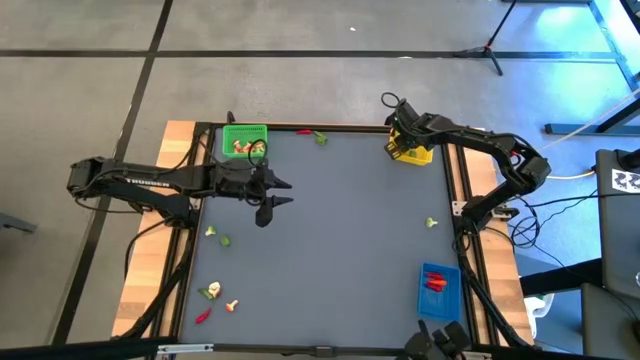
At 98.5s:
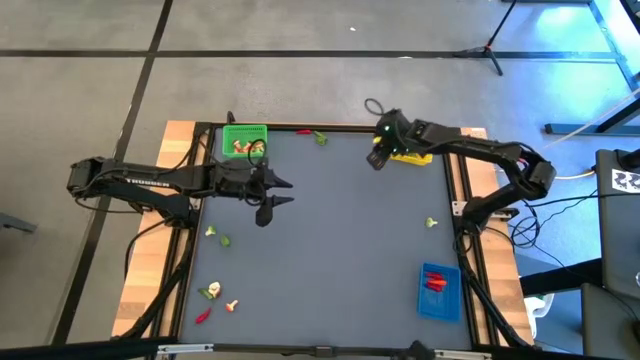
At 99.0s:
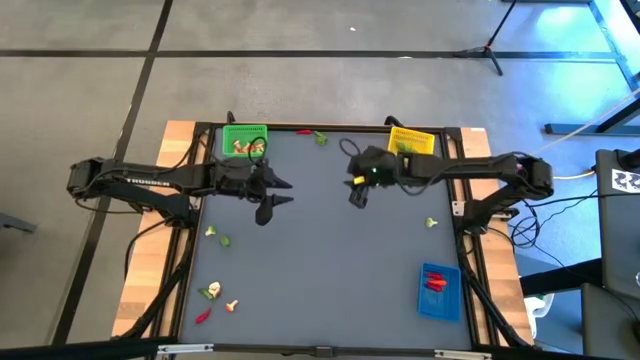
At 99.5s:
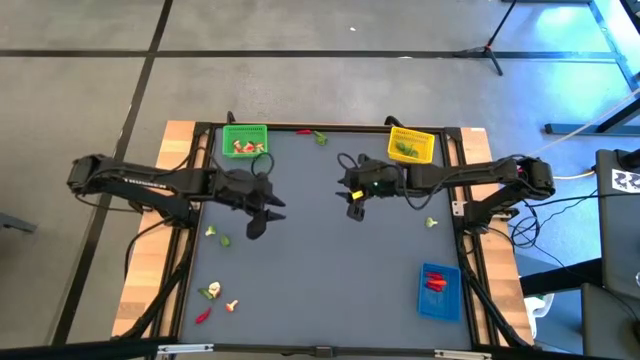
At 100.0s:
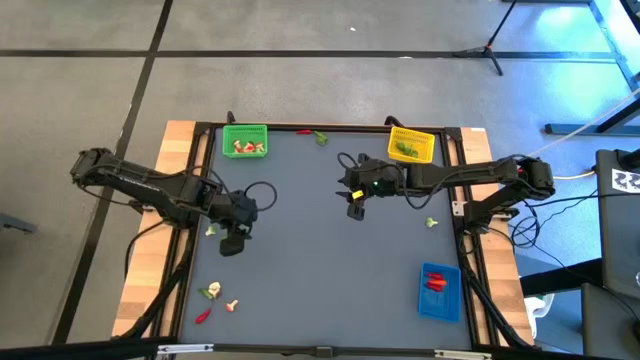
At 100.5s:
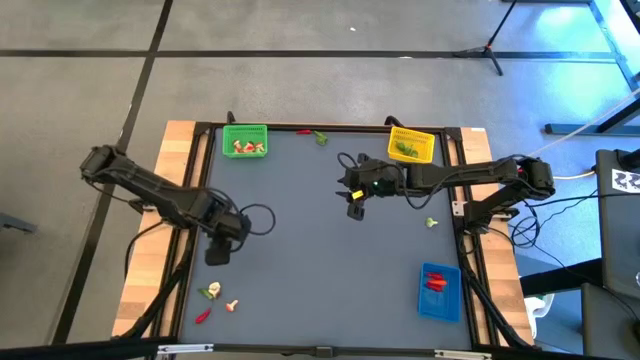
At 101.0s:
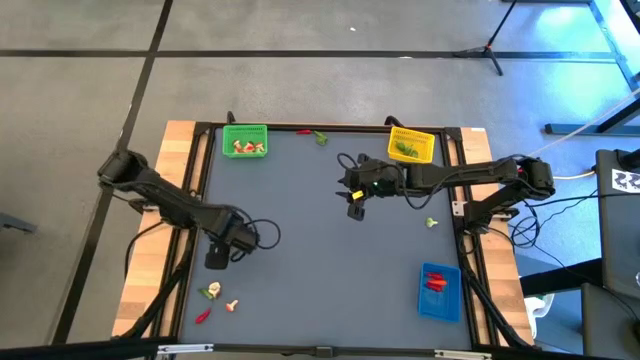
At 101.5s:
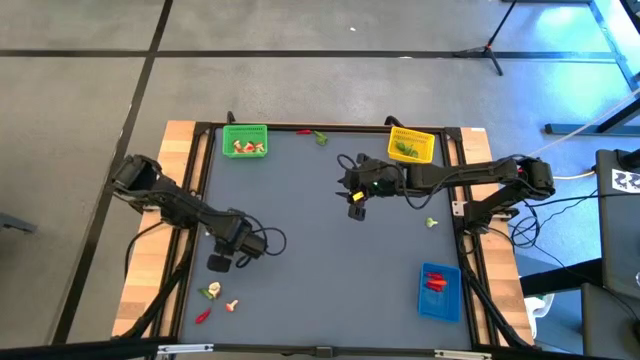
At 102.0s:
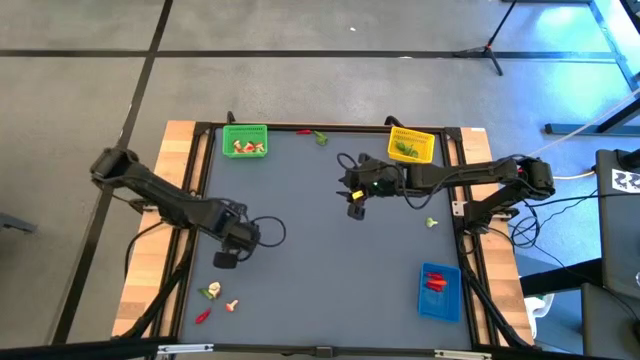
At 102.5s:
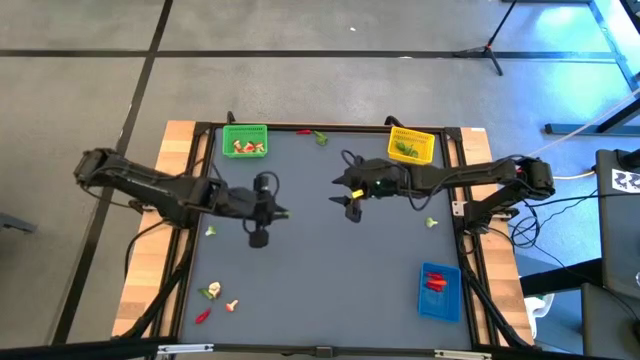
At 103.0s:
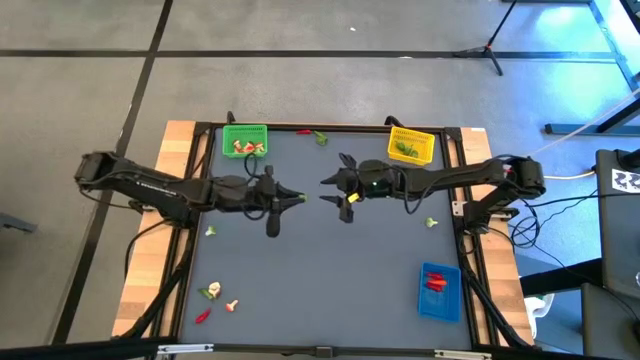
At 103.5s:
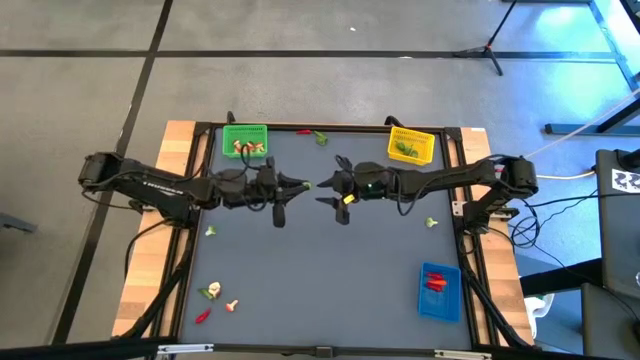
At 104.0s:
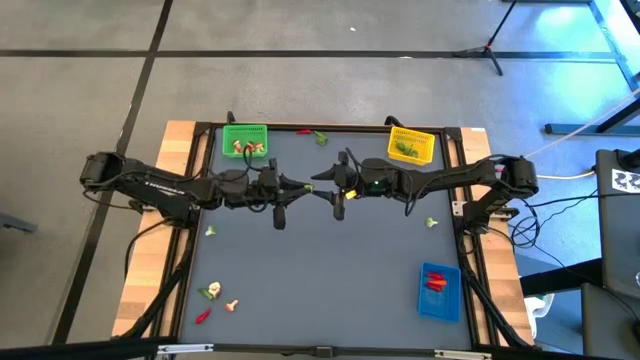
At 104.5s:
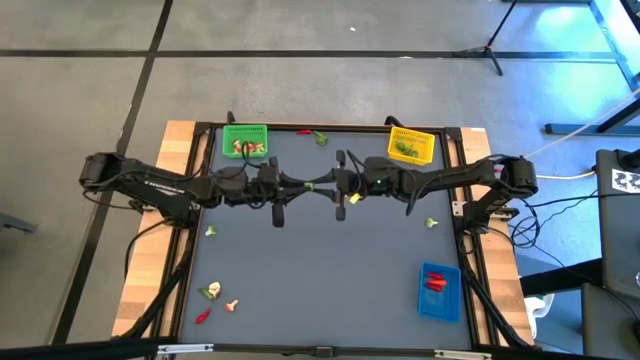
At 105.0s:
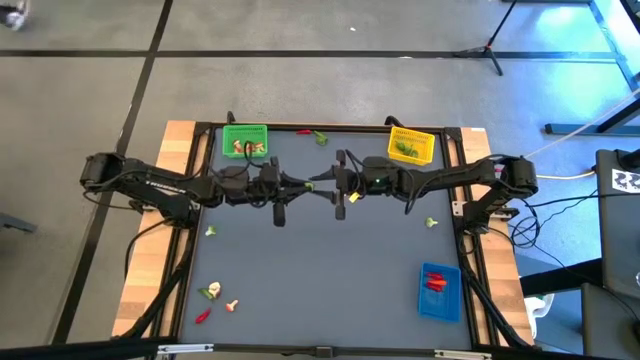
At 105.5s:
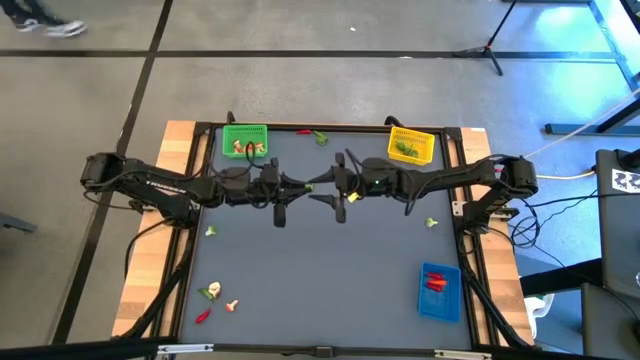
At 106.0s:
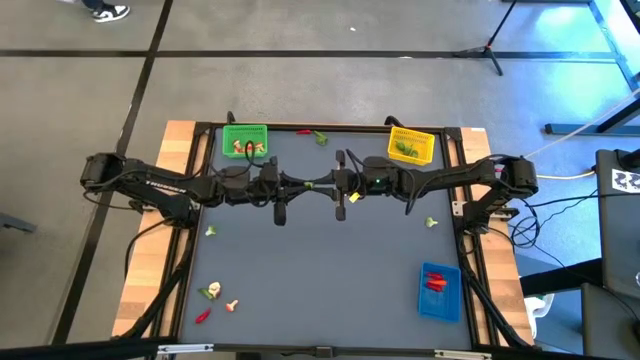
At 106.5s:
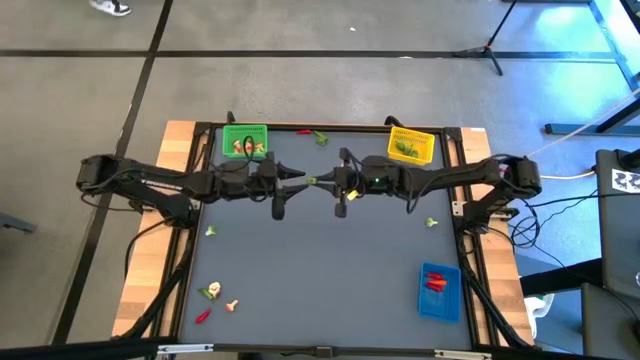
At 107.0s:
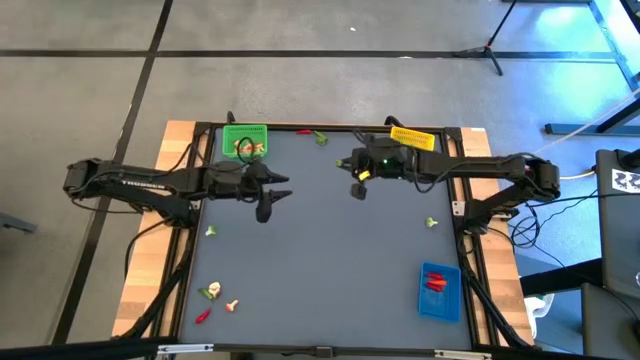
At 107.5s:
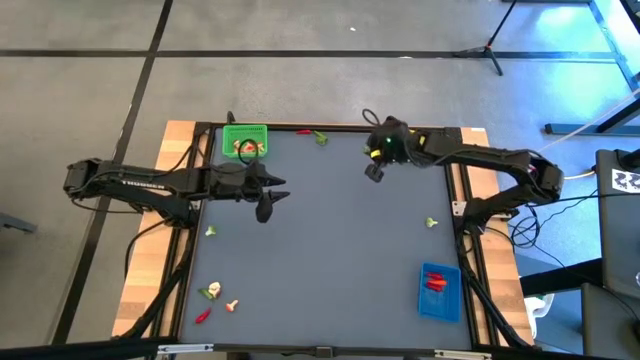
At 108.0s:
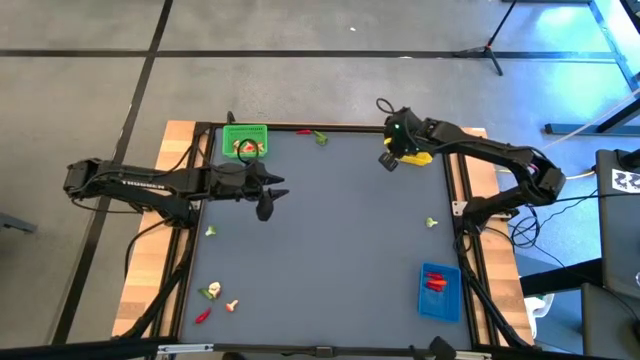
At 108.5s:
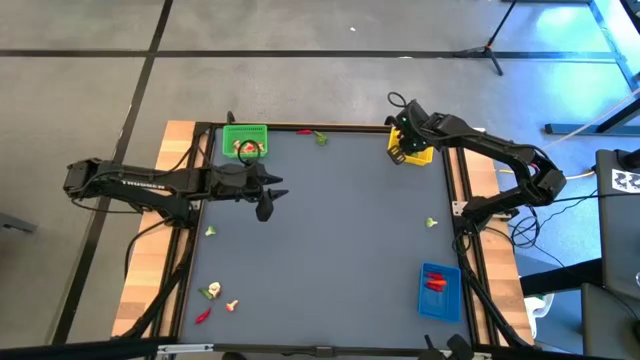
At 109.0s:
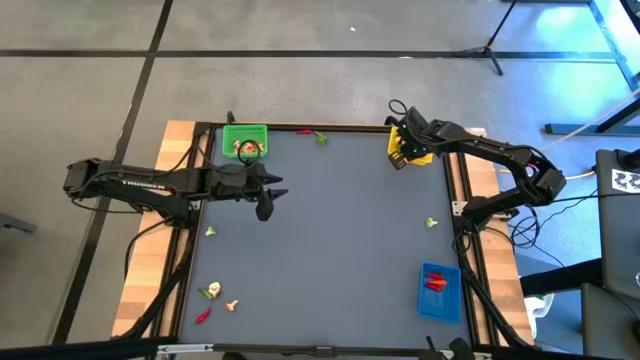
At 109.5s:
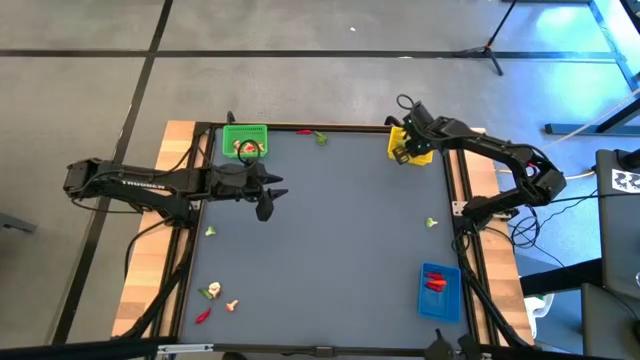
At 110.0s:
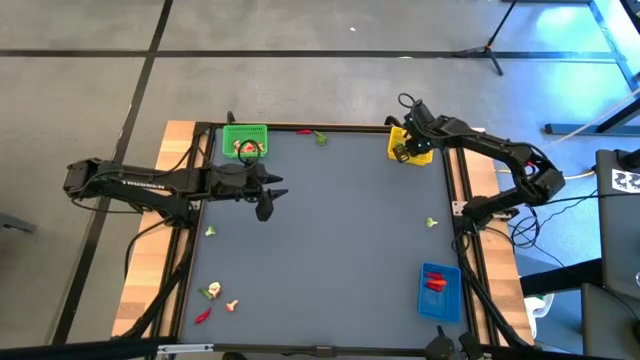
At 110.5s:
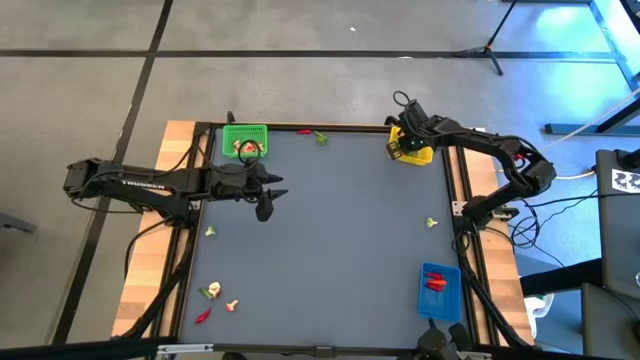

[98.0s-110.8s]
Task: Sort produce into baskets
Put the green chili pepper into the yellow bin

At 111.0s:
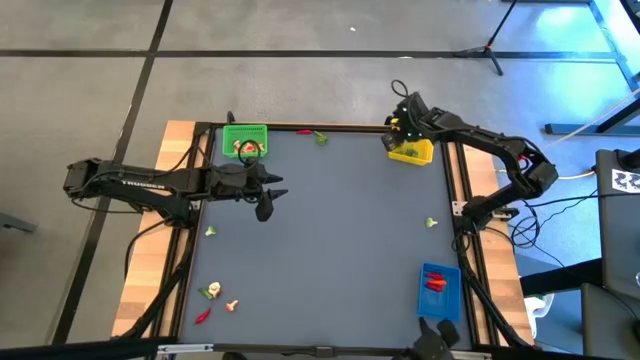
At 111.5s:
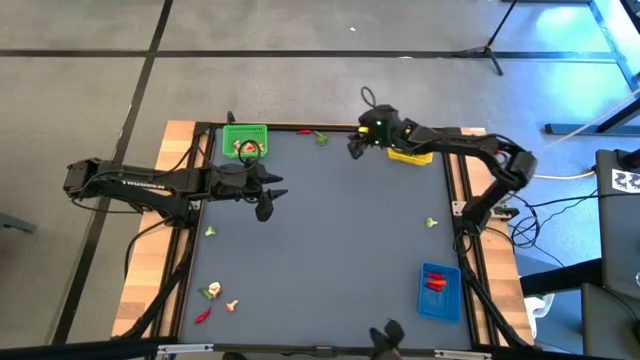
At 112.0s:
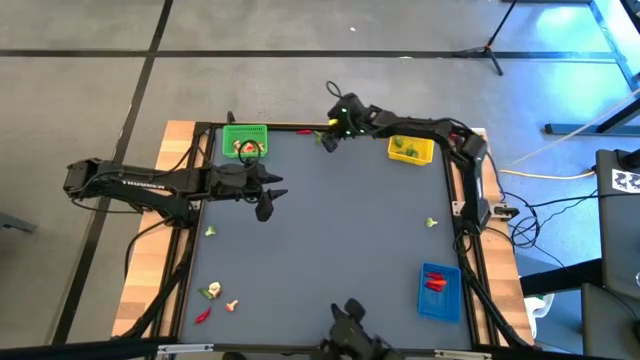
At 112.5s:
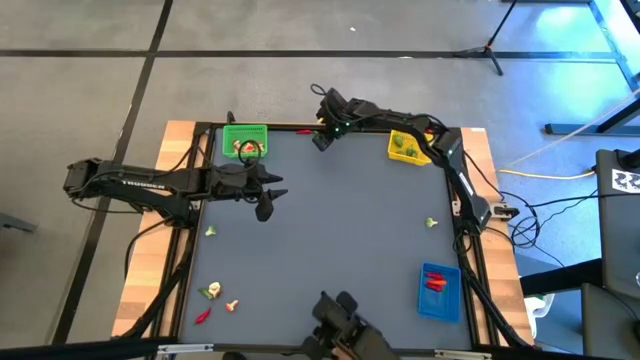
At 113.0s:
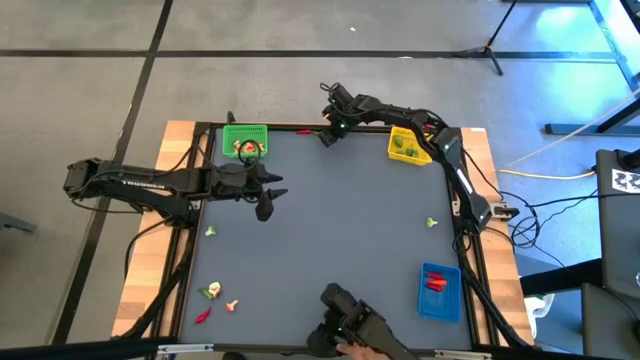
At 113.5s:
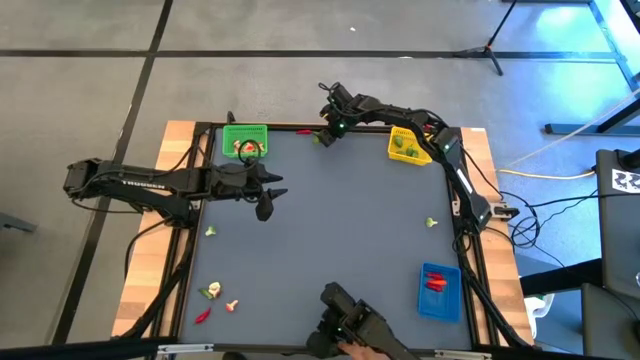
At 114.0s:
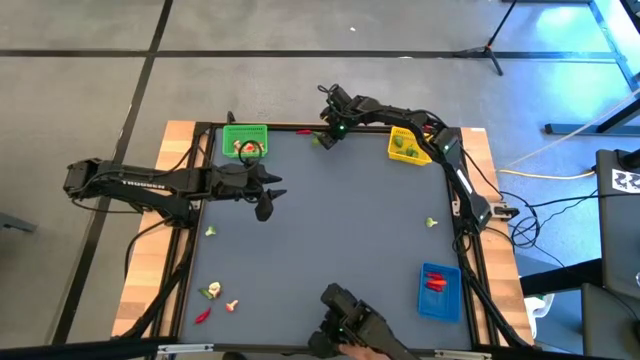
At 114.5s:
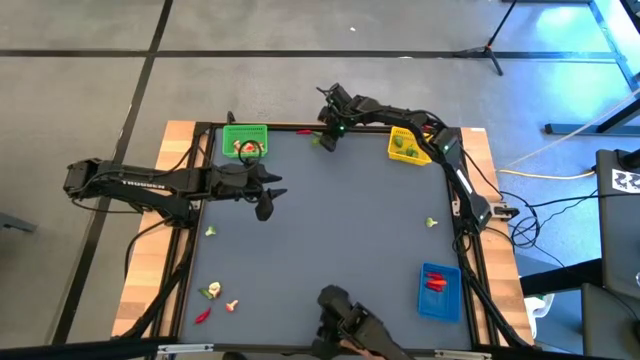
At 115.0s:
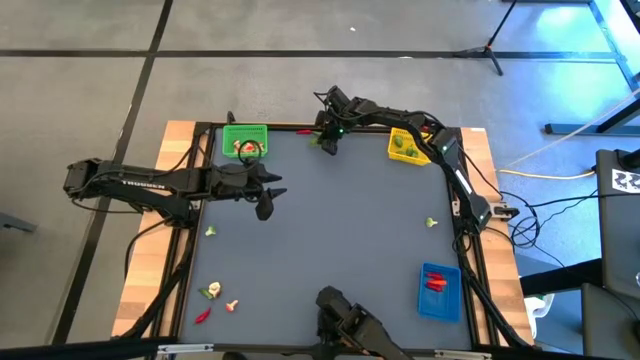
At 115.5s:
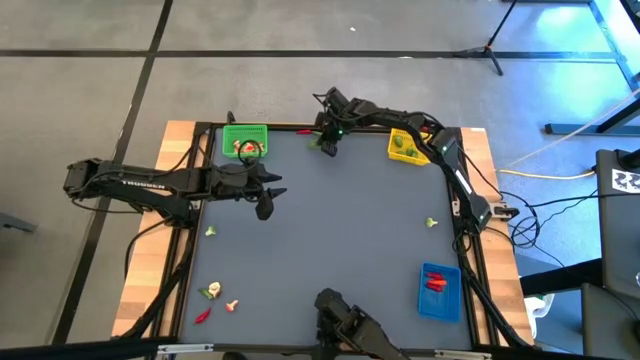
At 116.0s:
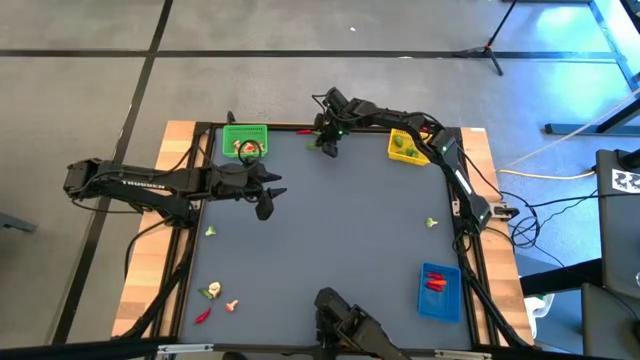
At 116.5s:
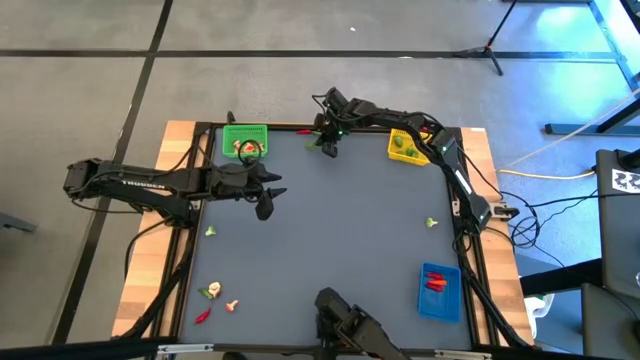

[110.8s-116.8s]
Put the green chili pepper into the yellow bin

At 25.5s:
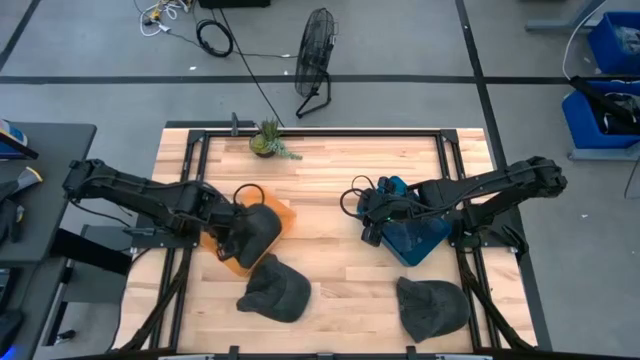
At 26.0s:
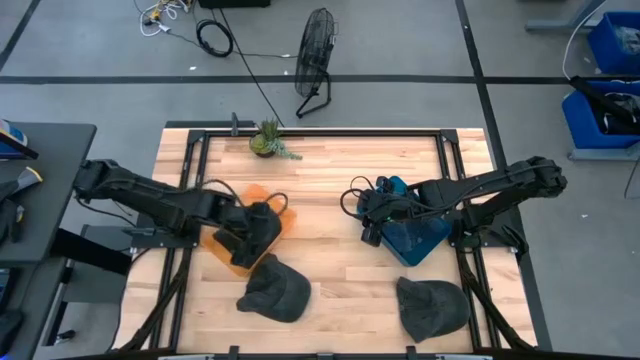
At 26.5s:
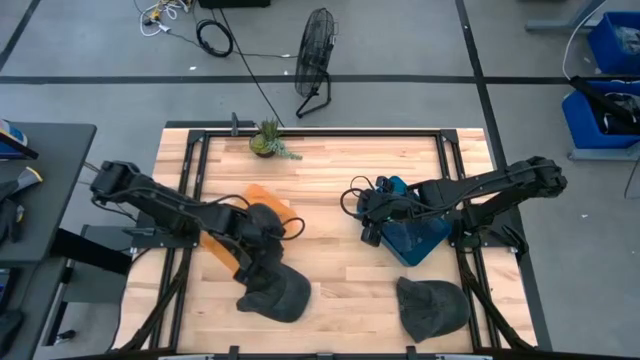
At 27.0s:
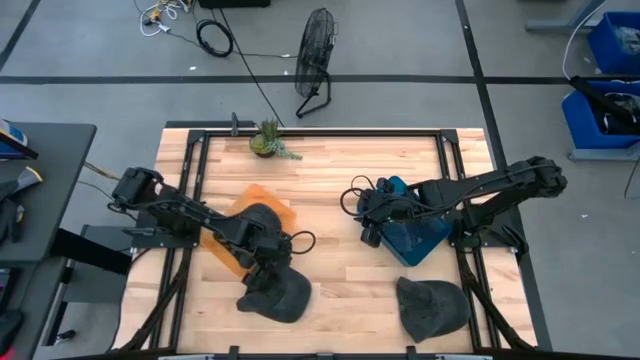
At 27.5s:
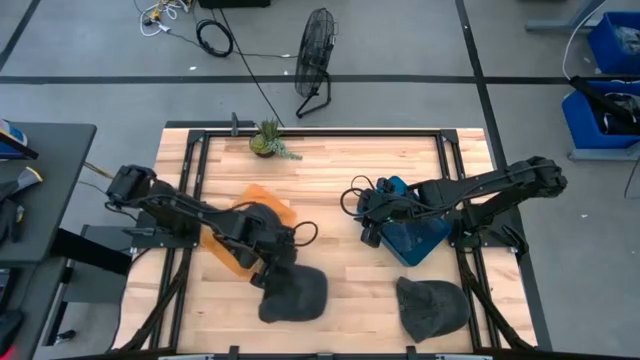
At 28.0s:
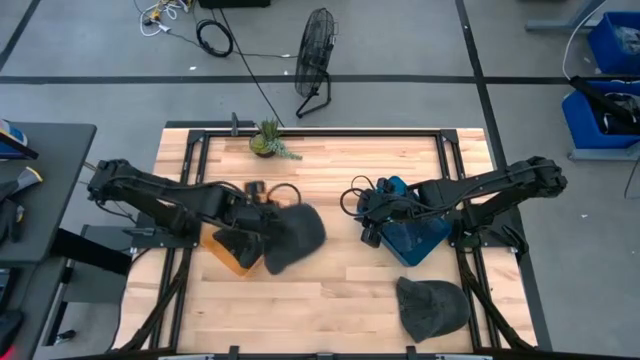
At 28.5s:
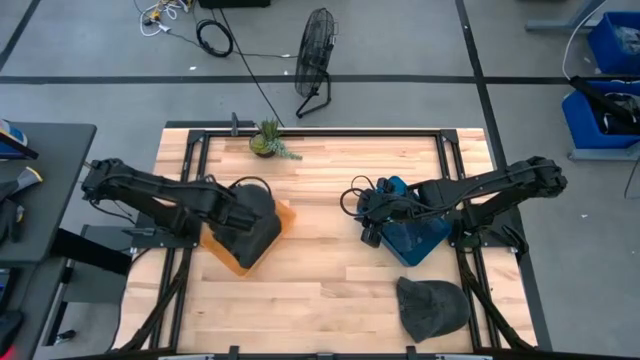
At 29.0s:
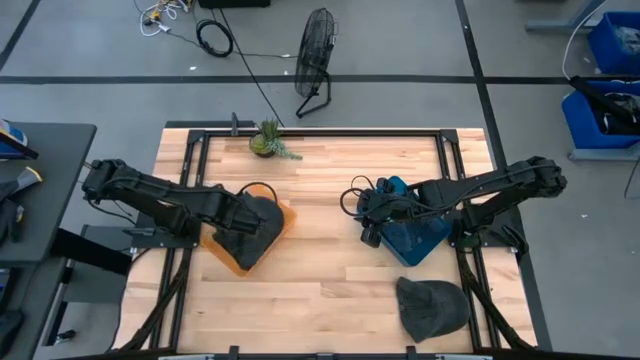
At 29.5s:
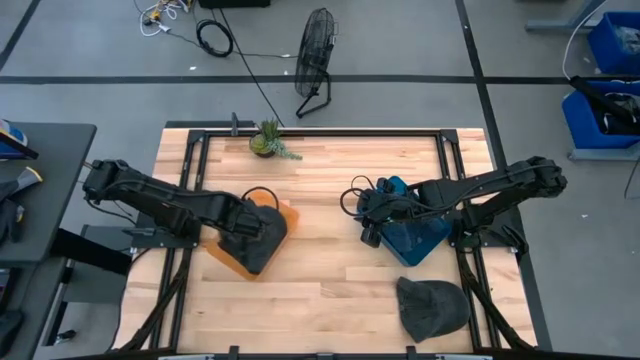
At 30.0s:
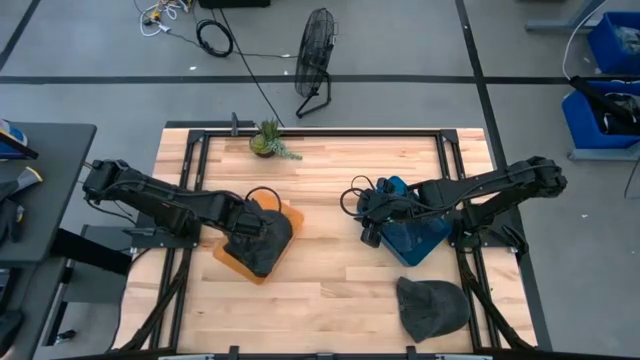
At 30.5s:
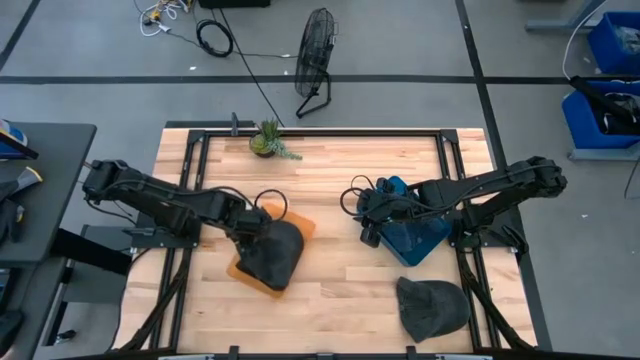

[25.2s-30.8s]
Task: Pick & Place hat
Put the left black cap into the orange bin
